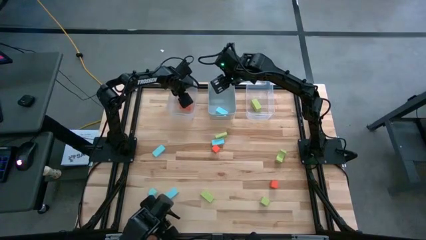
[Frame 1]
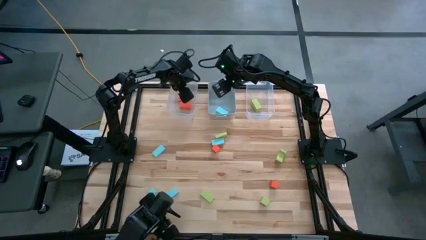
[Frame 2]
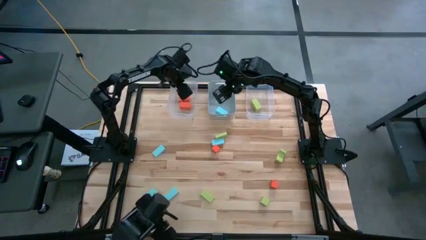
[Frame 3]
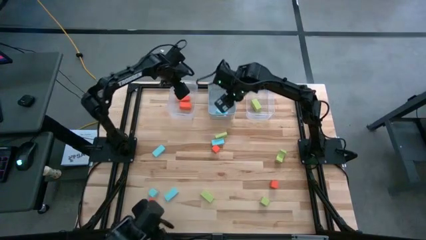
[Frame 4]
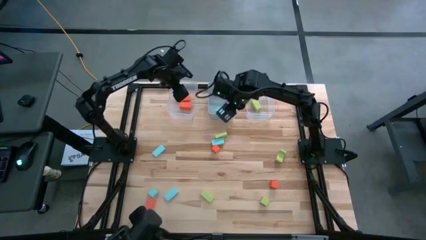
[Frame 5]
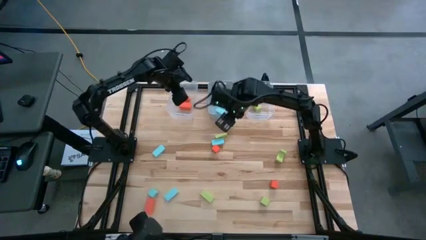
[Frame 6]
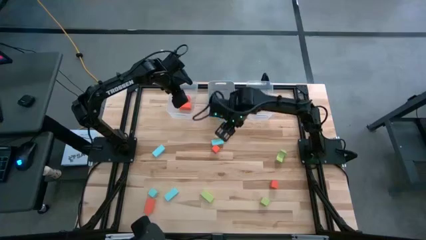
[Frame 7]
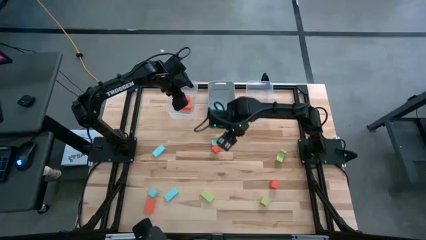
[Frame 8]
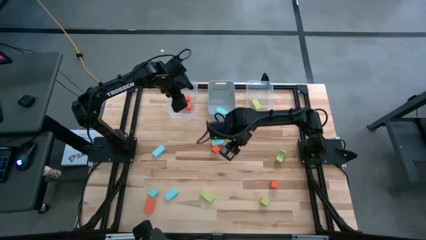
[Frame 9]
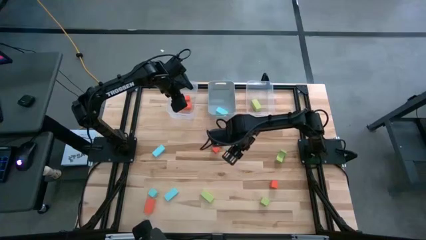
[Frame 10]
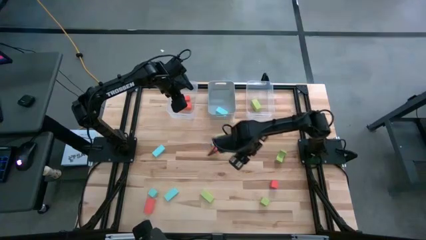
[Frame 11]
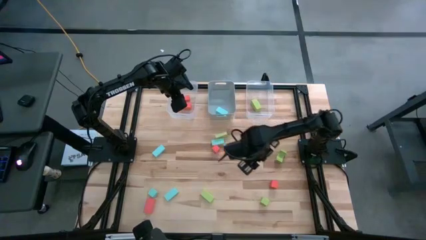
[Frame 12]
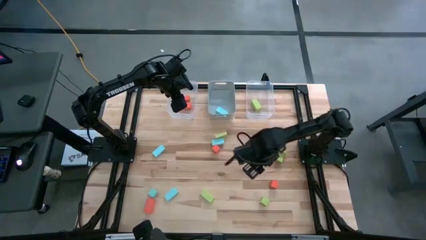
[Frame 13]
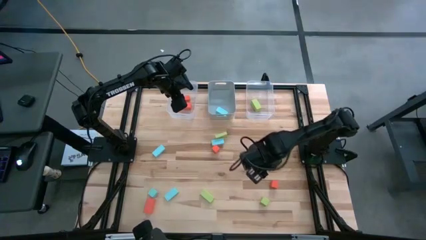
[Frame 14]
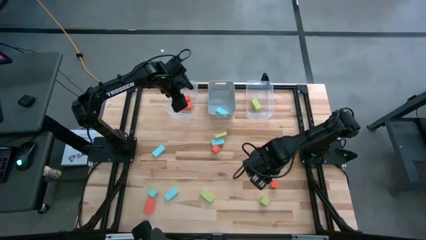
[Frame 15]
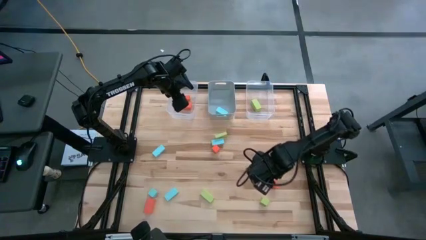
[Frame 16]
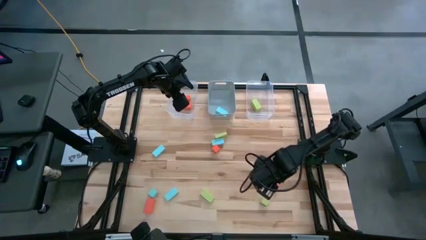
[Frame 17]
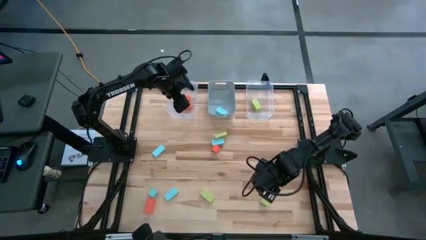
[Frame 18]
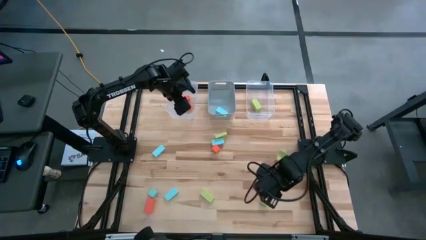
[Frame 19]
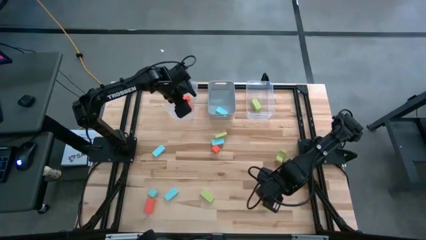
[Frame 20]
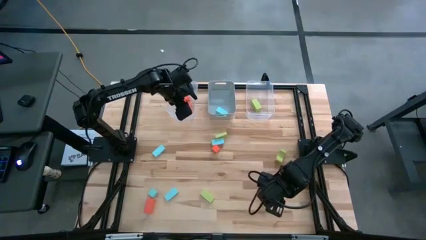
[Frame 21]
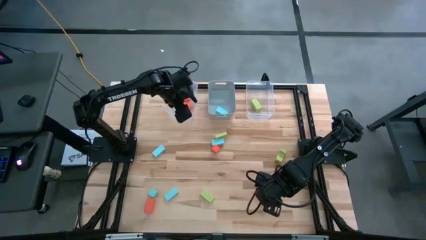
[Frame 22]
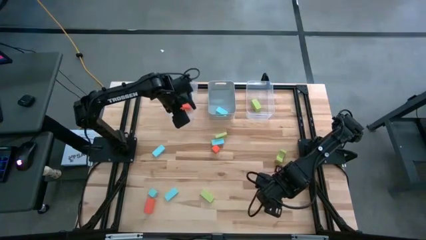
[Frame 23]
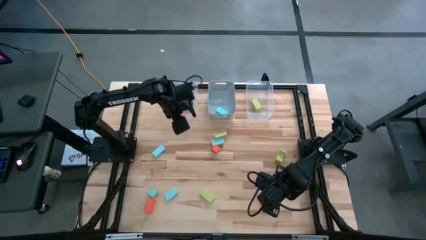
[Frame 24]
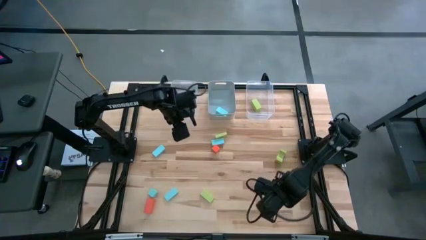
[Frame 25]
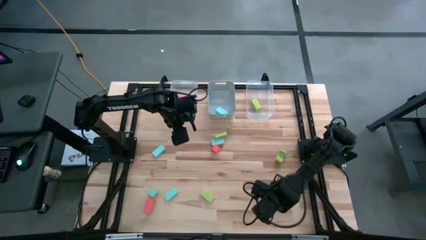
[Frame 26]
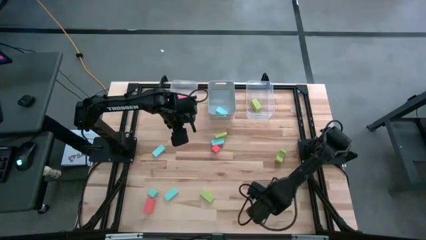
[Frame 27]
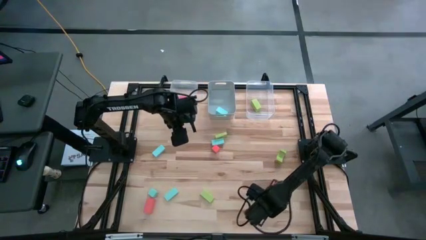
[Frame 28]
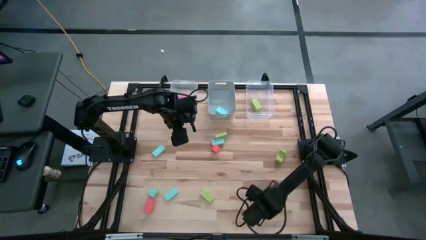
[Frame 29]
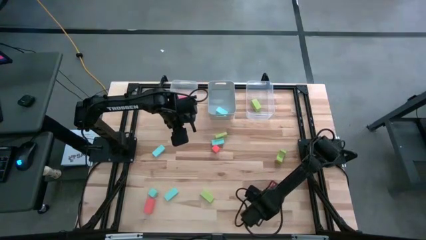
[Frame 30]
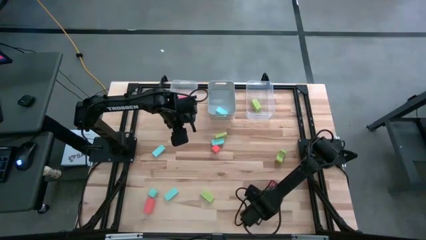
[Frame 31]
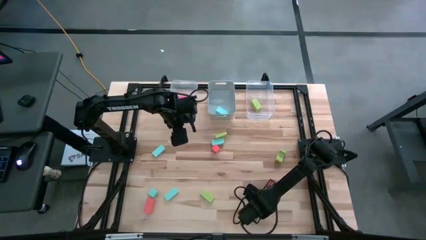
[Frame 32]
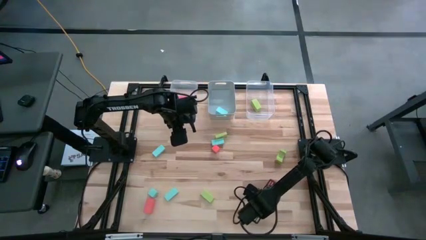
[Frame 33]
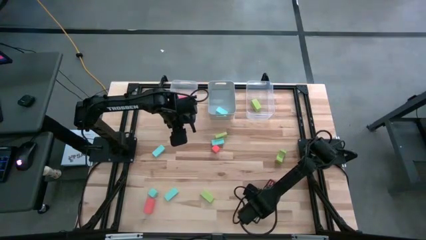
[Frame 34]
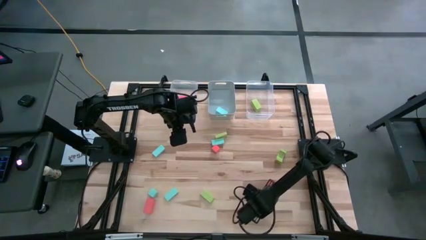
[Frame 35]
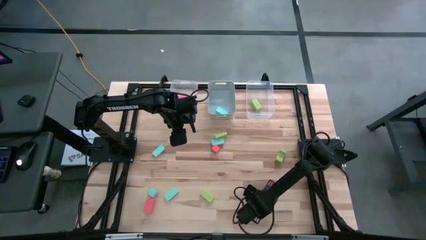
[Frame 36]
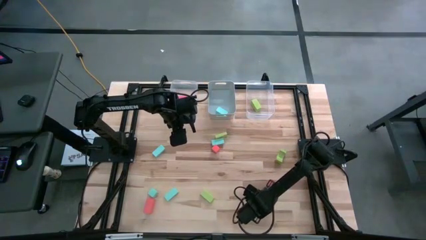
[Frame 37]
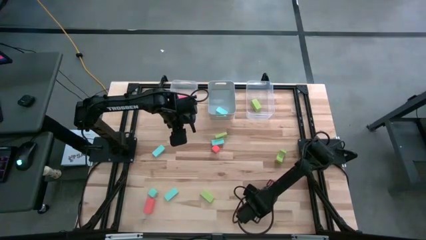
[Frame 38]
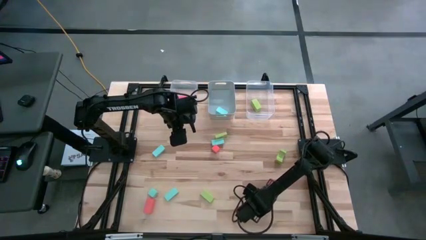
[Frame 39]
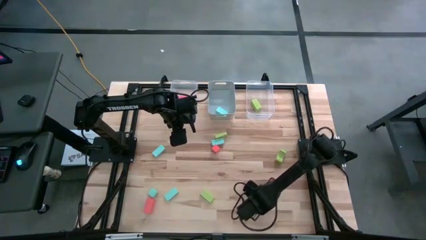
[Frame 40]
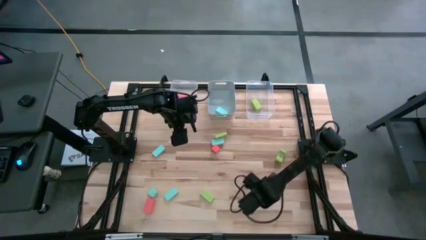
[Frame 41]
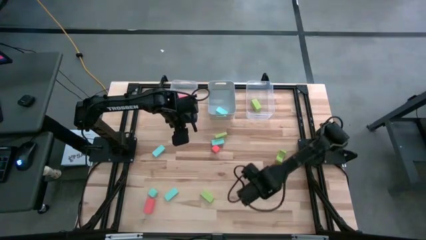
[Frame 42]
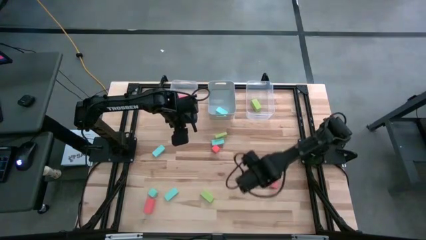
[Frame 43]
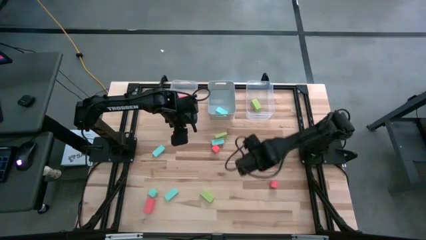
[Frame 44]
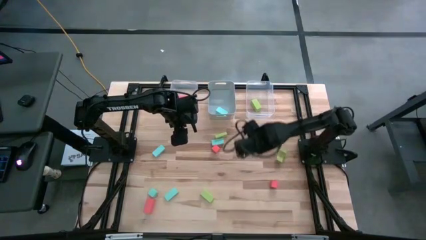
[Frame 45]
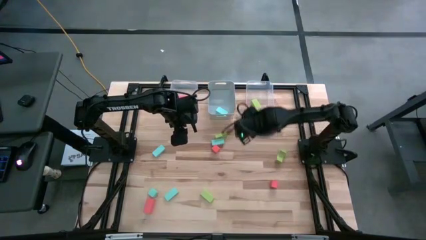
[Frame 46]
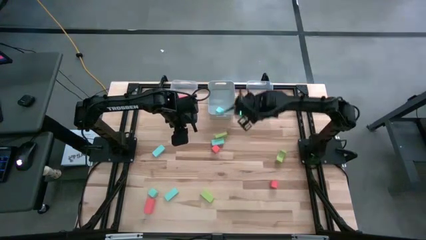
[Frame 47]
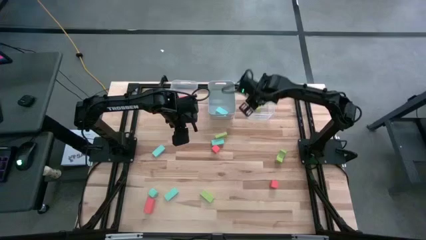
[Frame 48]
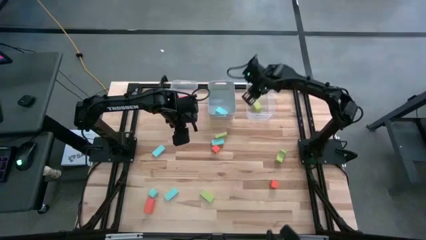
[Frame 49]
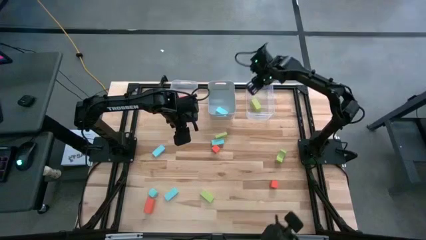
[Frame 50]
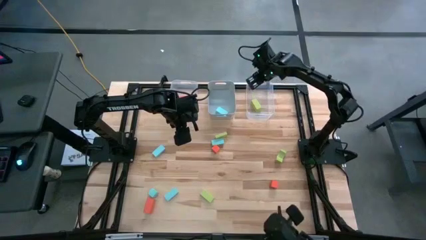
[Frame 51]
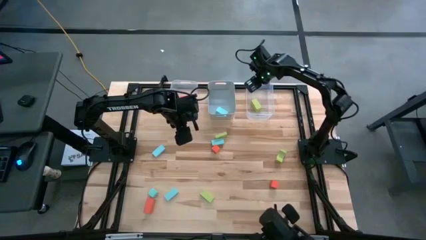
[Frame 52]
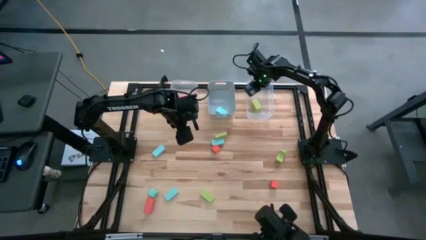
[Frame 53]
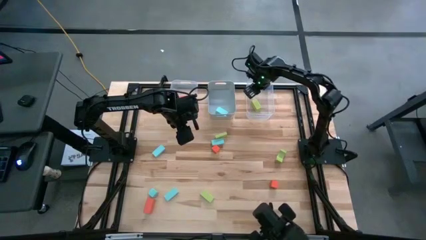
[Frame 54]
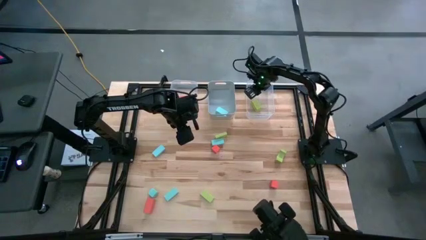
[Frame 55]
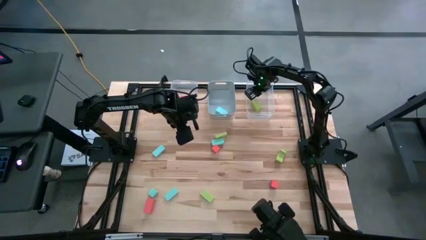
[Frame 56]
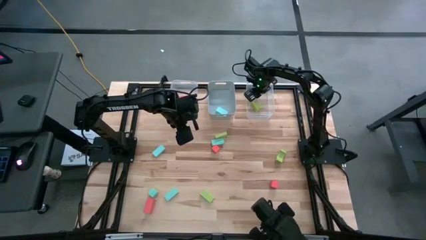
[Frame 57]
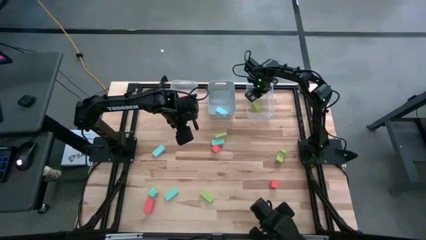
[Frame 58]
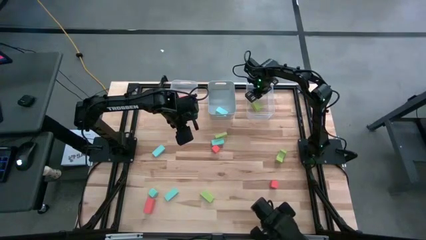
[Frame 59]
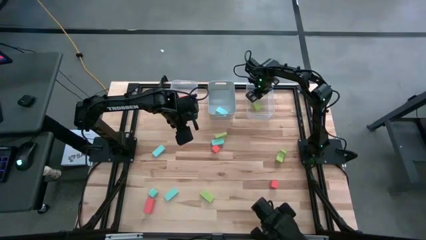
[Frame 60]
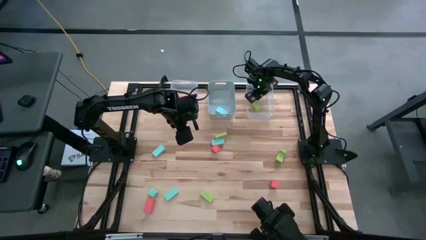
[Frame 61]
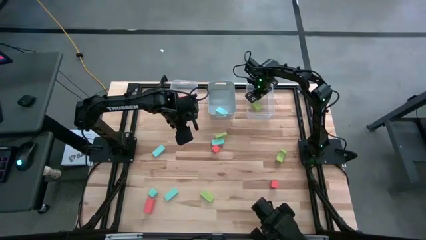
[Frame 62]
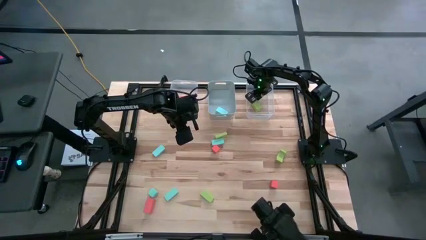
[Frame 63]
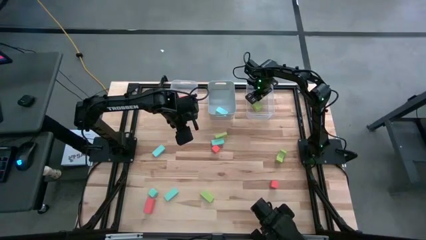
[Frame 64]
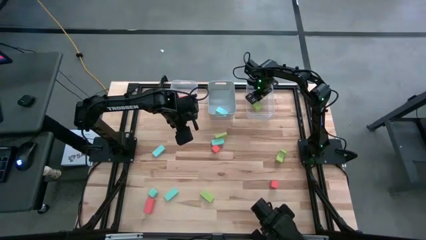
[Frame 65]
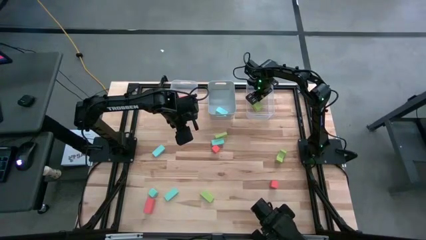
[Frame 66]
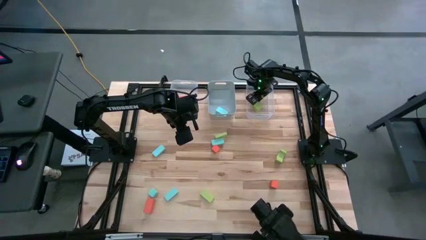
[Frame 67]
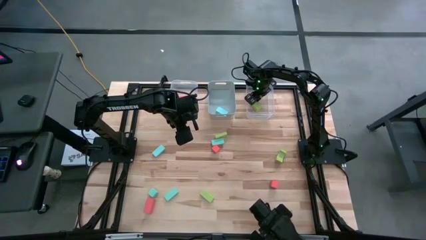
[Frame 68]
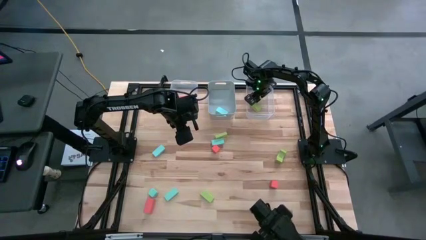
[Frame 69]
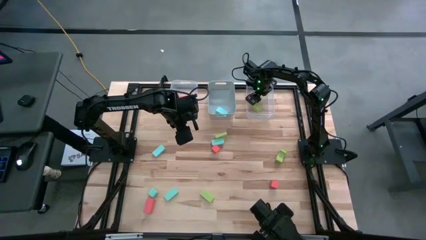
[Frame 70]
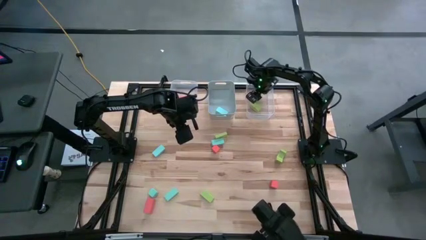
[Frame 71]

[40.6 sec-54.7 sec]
Task: Sort & place blocks by color
Put the green block into the right transparent bin

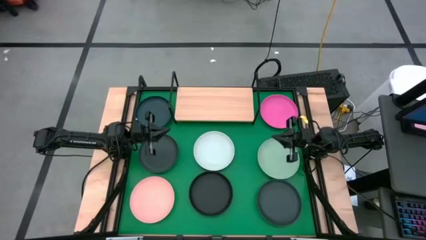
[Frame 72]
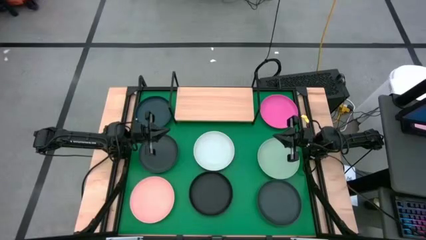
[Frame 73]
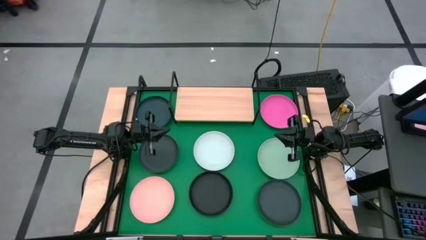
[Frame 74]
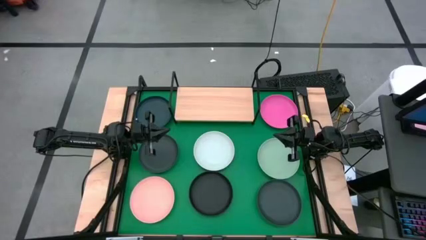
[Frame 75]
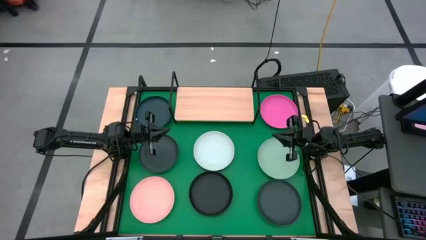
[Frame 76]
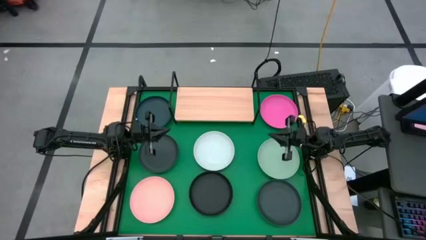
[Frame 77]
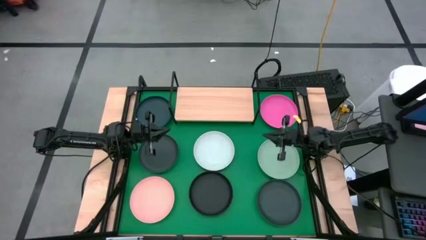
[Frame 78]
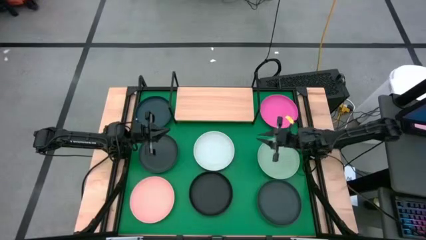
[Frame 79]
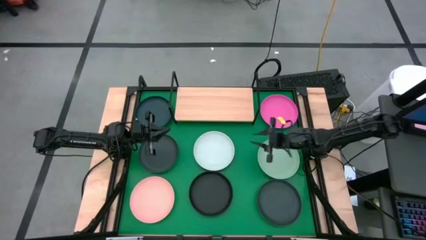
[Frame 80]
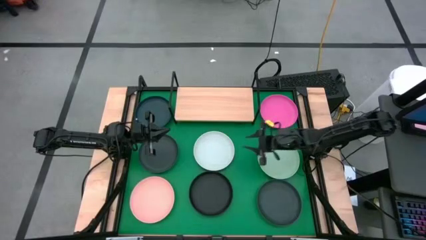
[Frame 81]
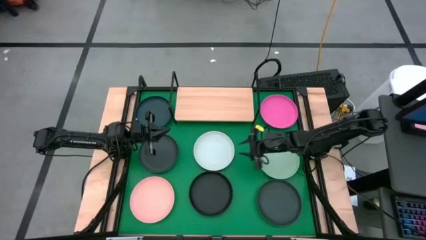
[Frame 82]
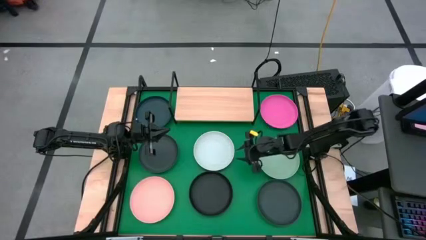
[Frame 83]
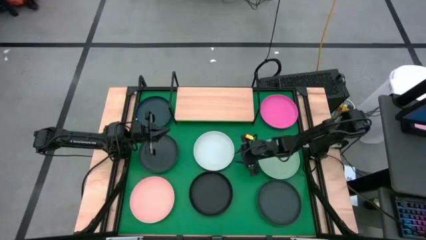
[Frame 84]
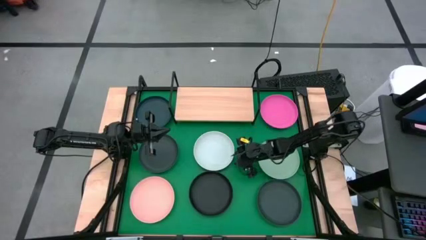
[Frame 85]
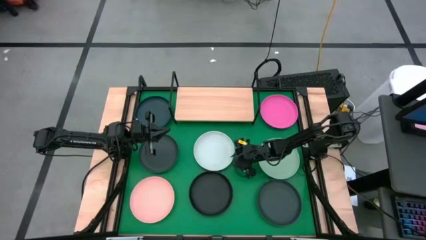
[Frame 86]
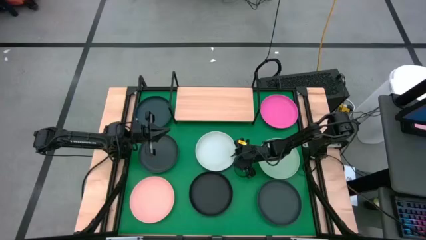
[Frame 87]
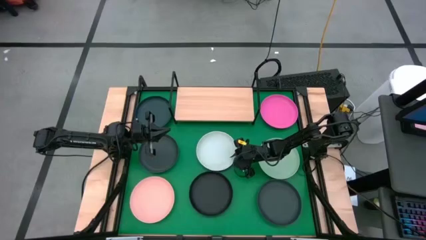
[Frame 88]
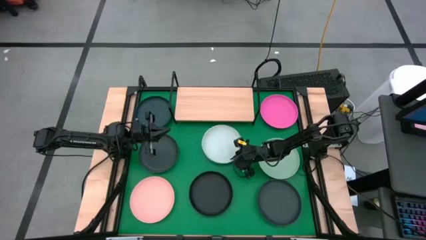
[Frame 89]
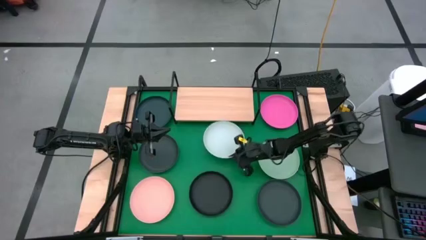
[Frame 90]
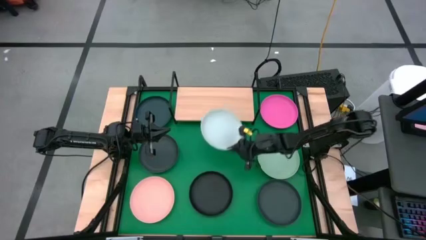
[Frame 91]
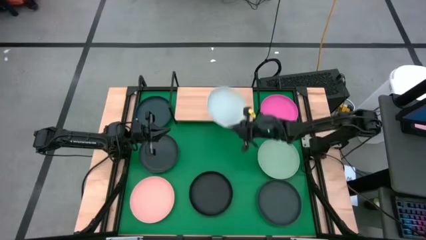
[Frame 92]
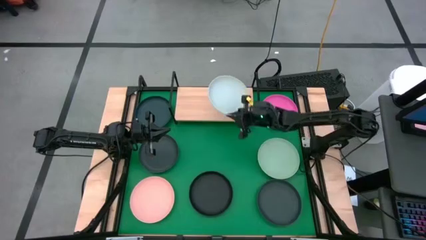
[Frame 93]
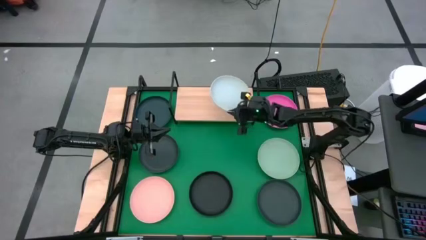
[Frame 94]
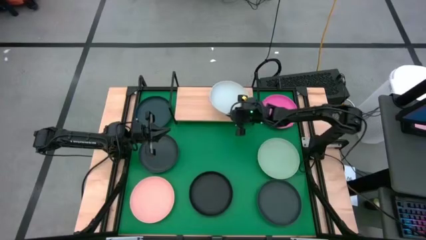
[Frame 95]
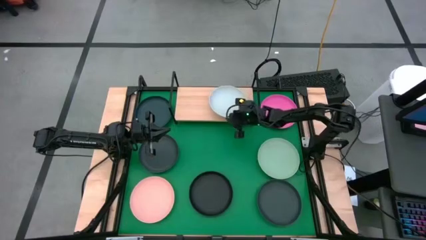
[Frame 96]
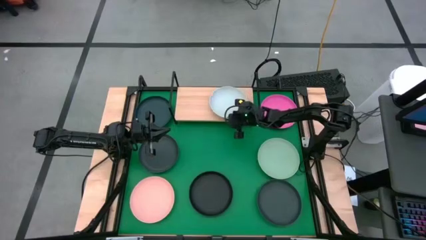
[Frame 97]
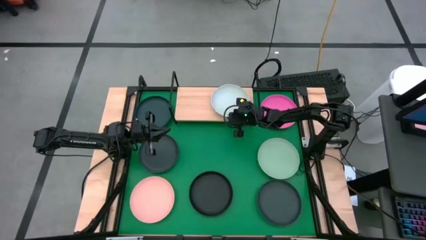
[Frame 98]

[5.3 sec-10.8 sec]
Task: Place and stack plates onto a shelf
Put the light blue plate on the shelf
